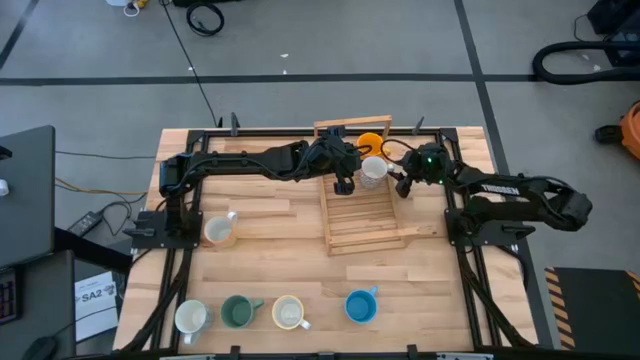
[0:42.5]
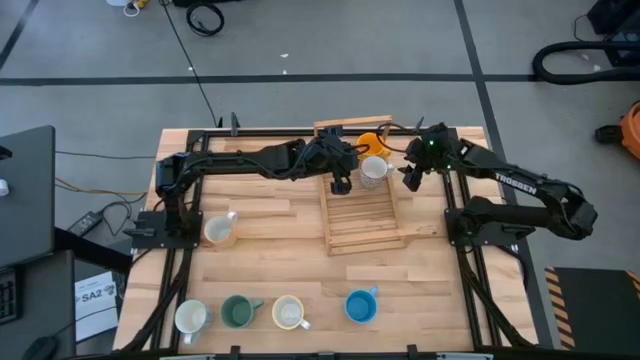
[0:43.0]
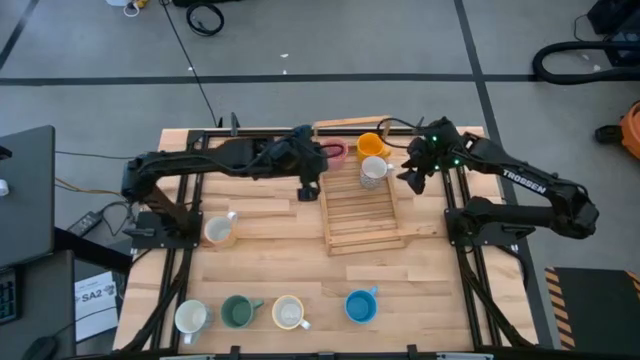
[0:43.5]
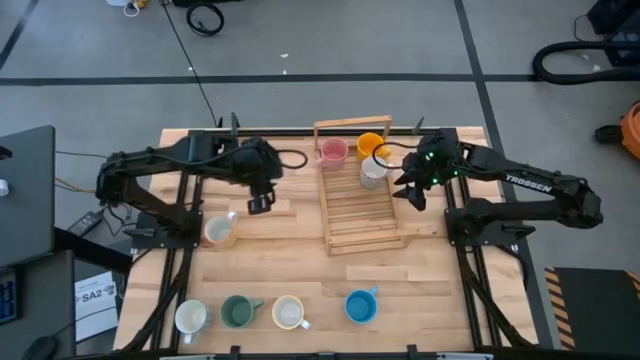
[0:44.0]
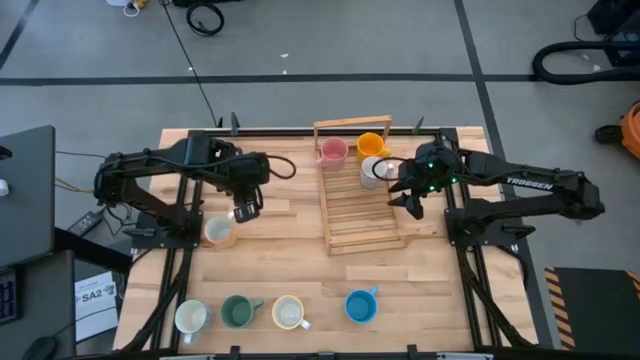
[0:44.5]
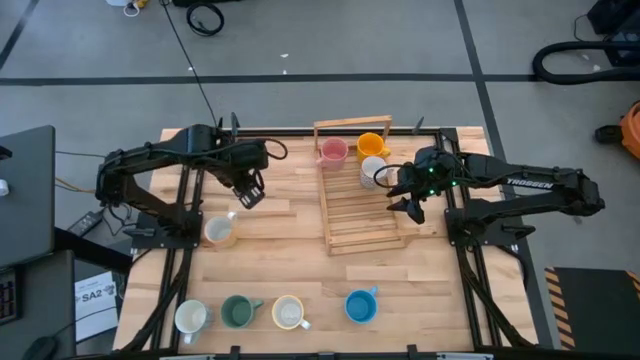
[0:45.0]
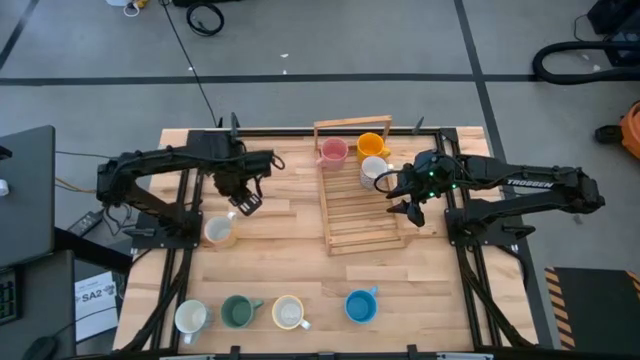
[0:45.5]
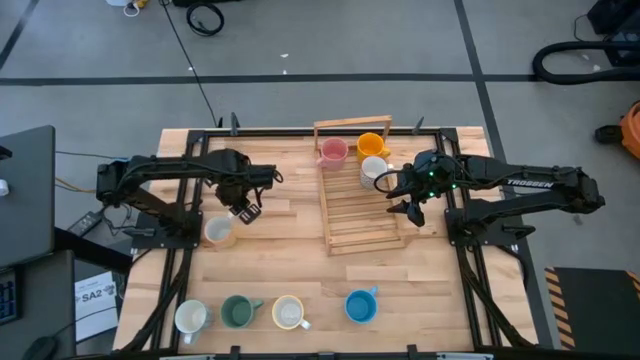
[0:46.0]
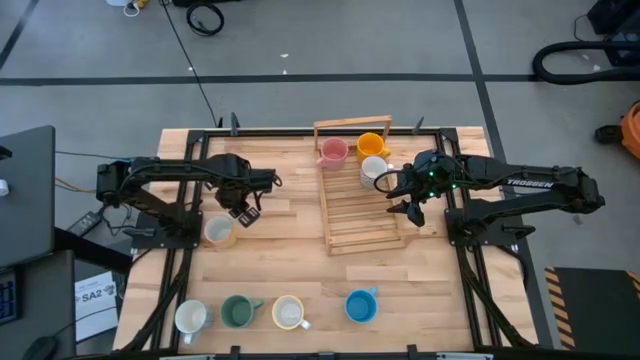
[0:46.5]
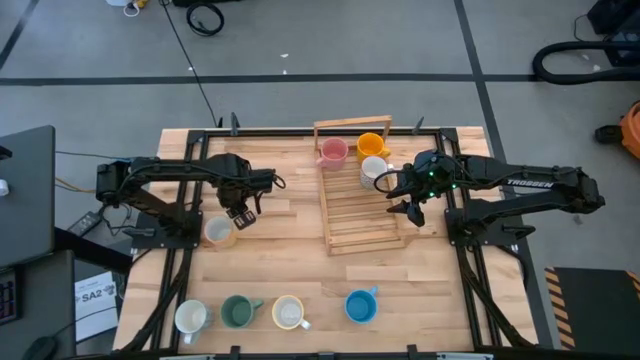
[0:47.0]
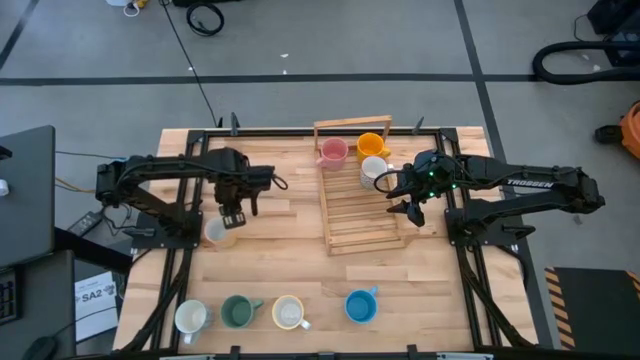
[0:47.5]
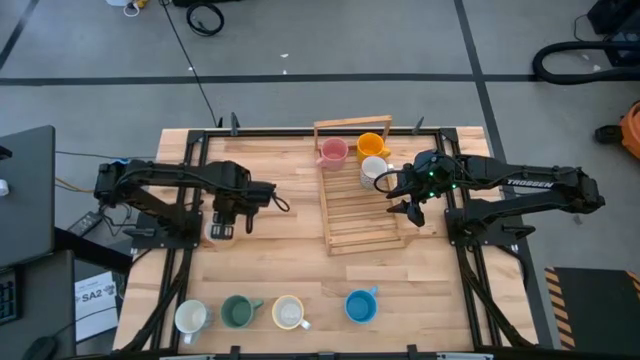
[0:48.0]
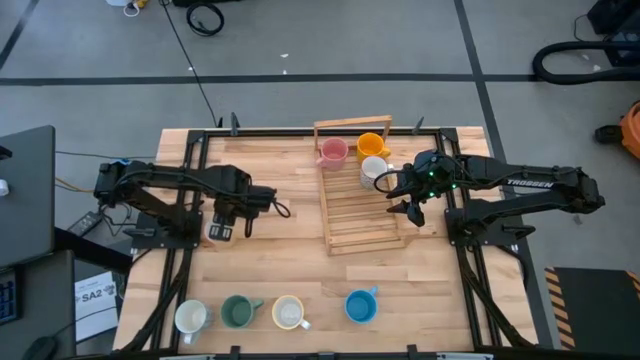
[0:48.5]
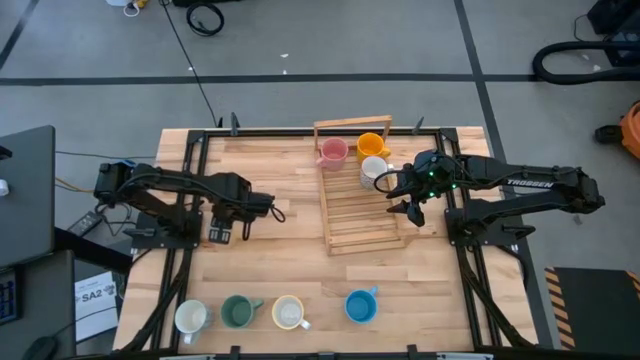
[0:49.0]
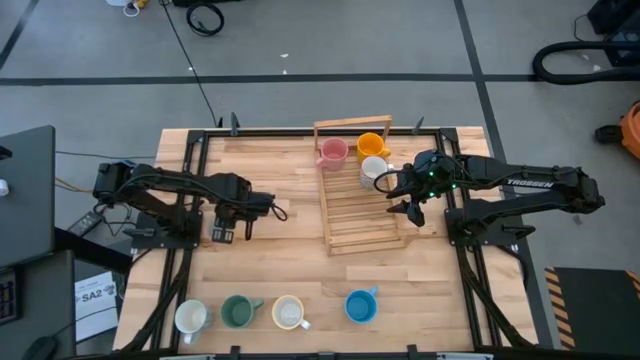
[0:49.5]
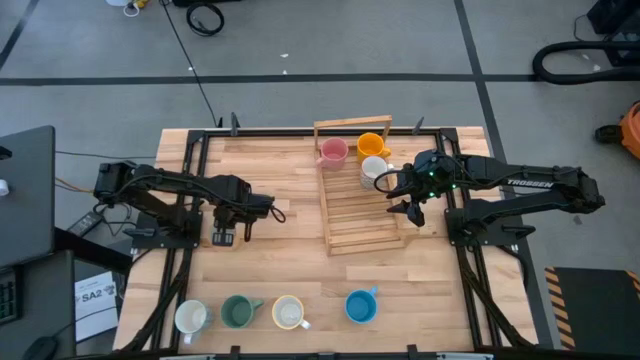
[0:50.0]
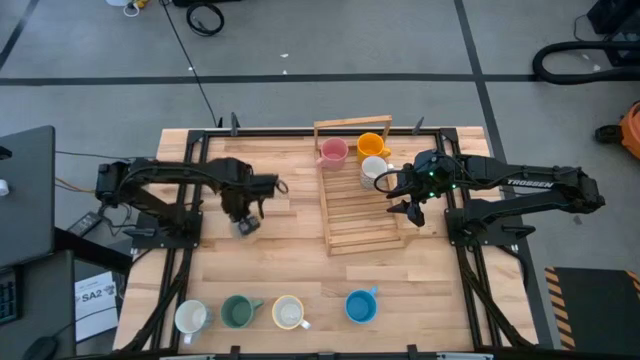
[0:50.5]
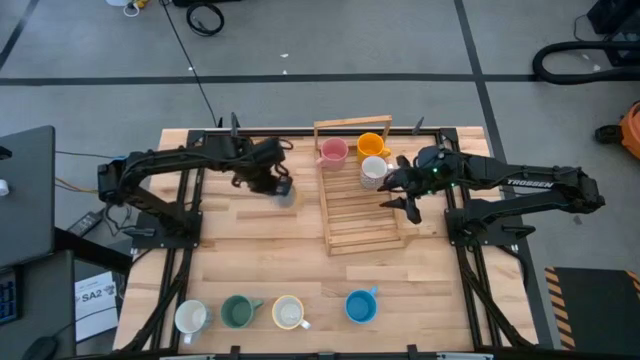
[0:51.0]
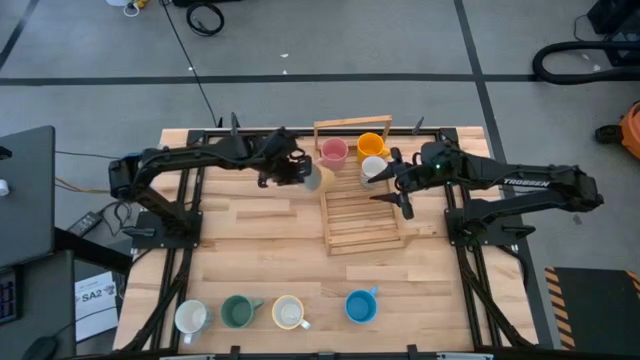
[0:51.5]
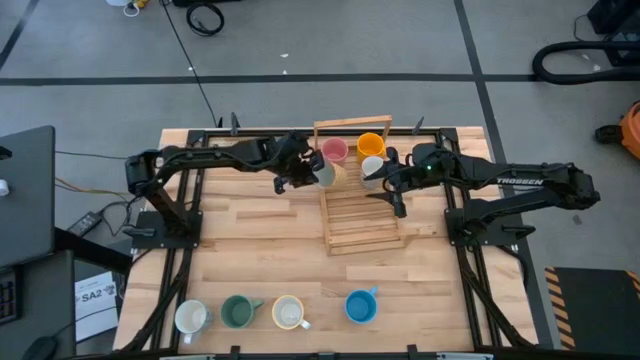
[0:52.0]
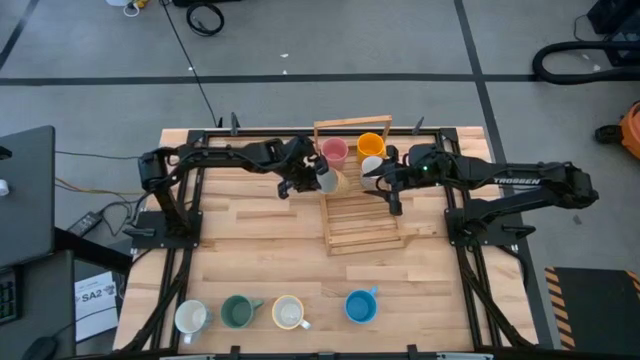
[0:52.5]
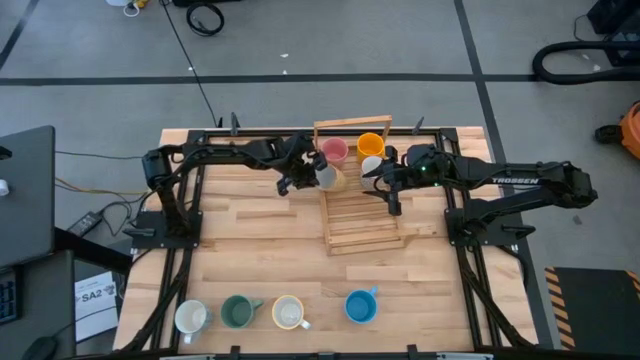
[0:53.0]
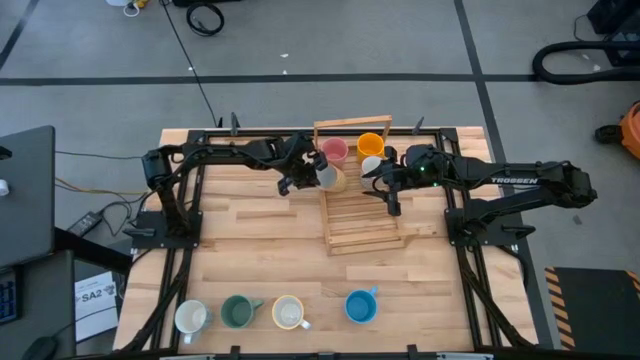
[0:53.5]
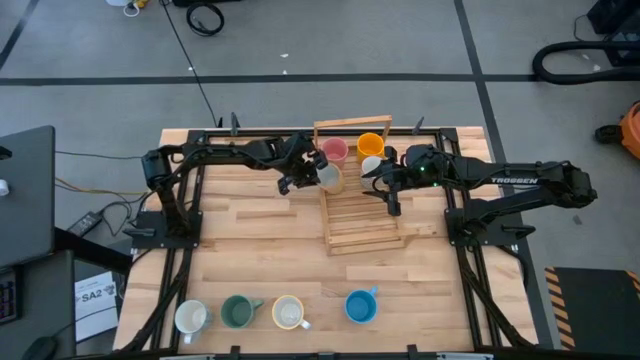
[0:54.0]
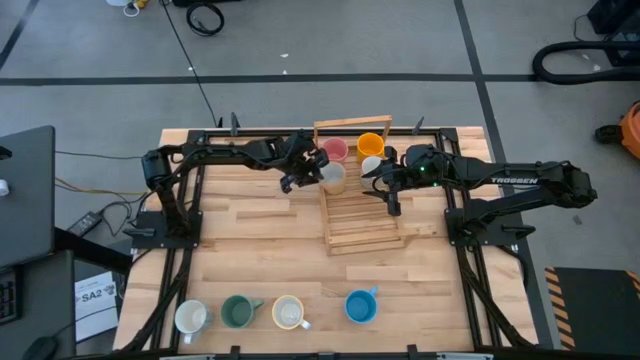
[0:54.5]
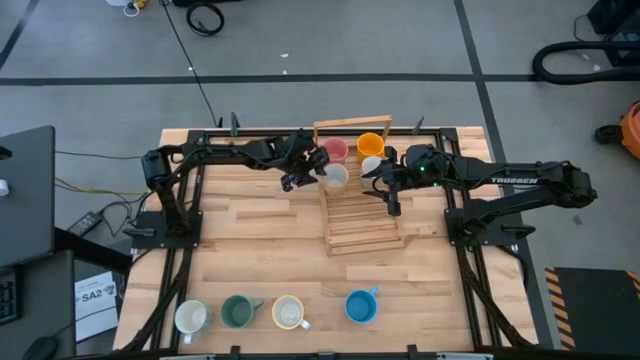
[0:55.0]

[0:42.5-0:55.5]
Task: Place coffee mugs
Put the yellow patterned mug on the shelf

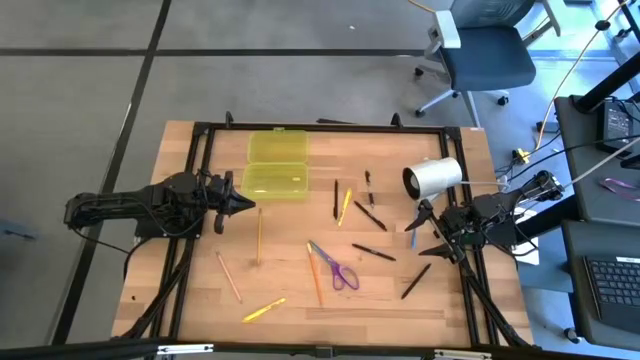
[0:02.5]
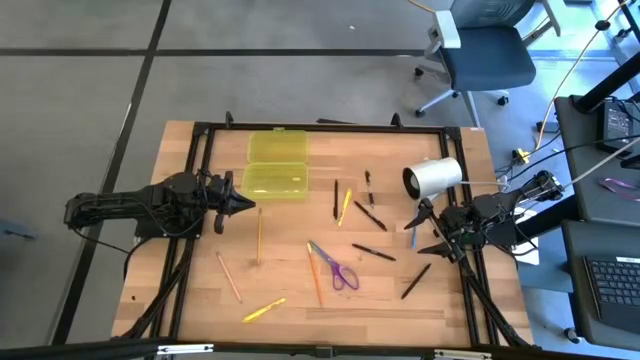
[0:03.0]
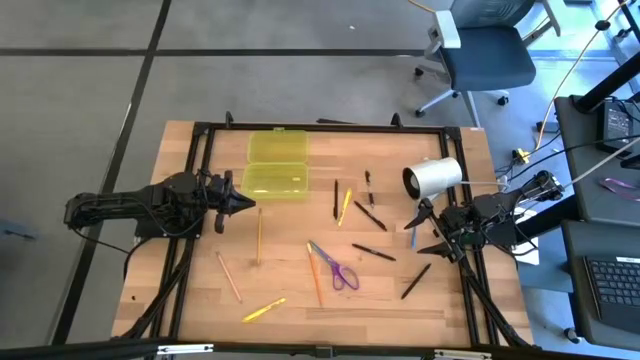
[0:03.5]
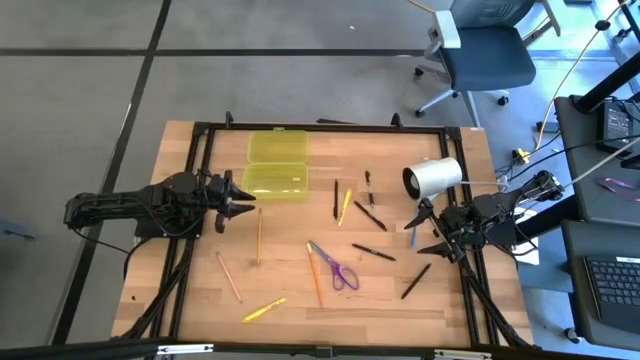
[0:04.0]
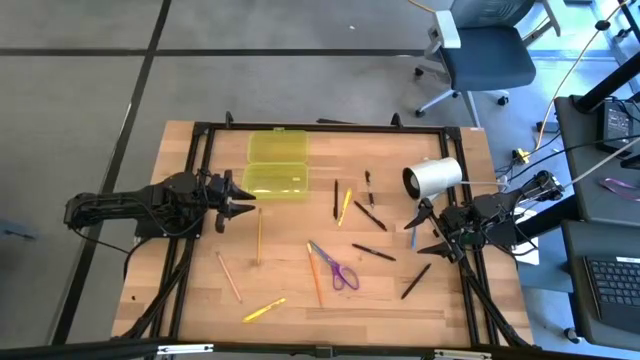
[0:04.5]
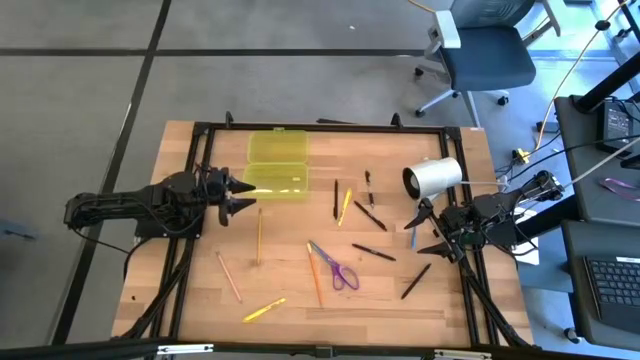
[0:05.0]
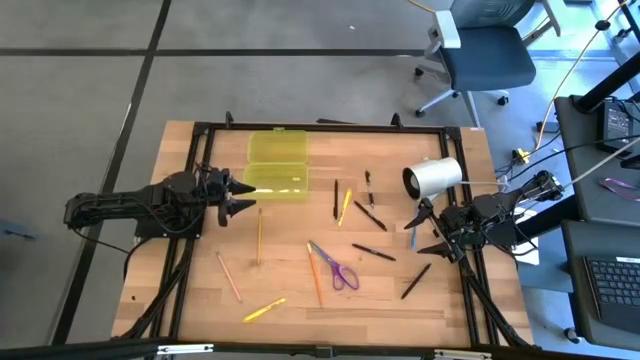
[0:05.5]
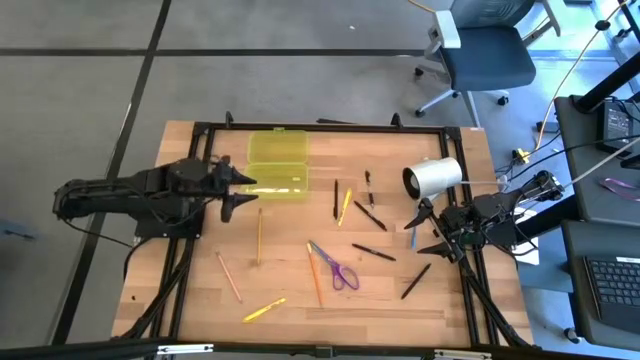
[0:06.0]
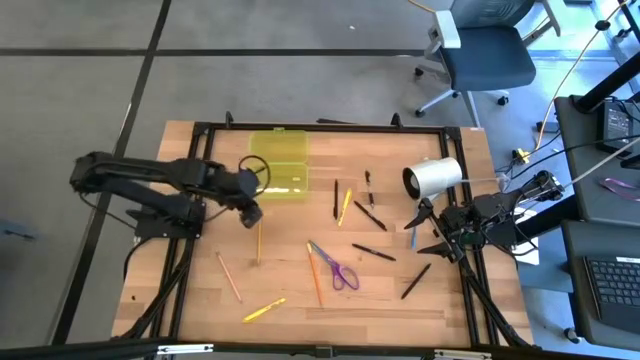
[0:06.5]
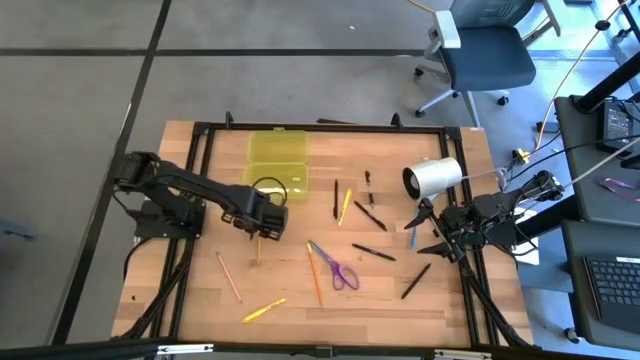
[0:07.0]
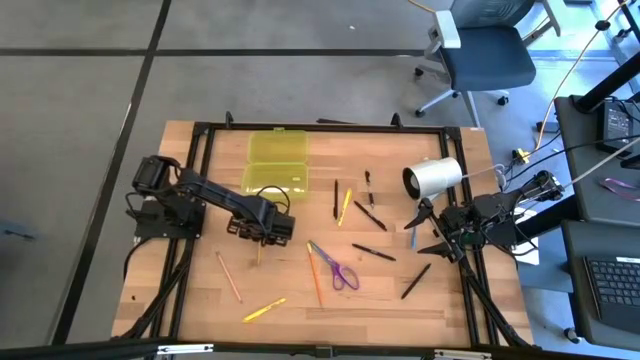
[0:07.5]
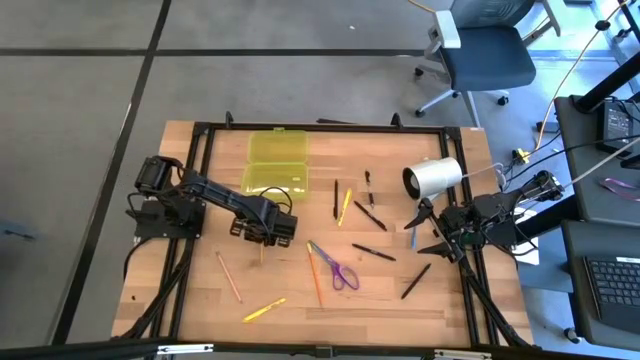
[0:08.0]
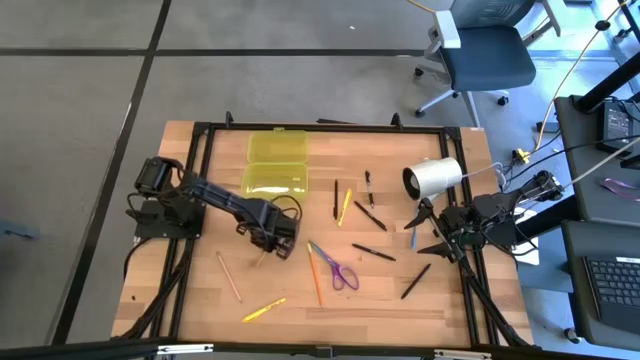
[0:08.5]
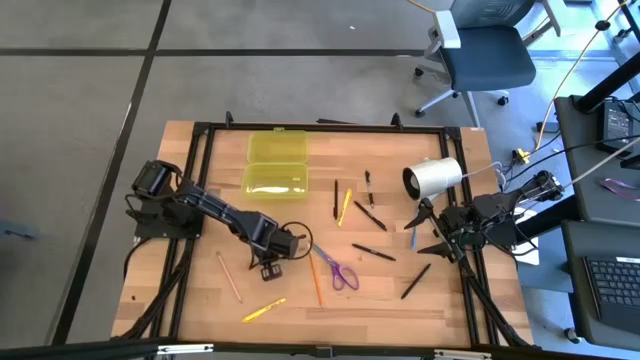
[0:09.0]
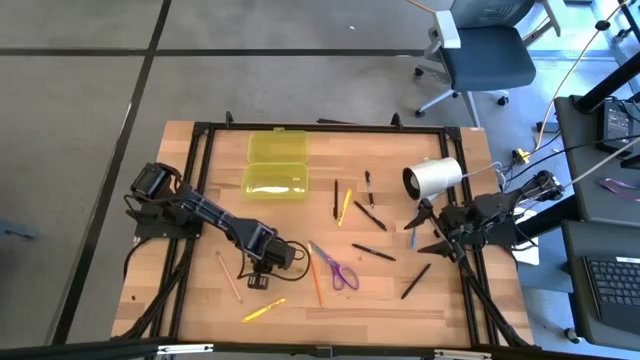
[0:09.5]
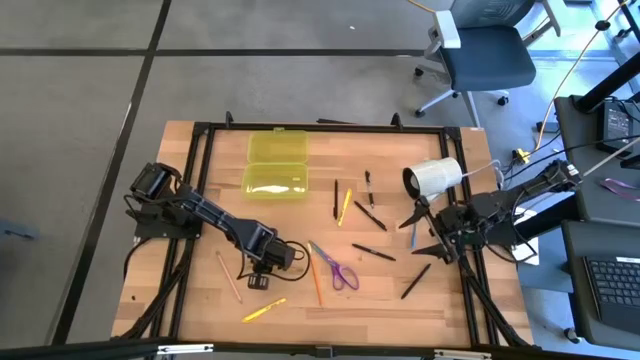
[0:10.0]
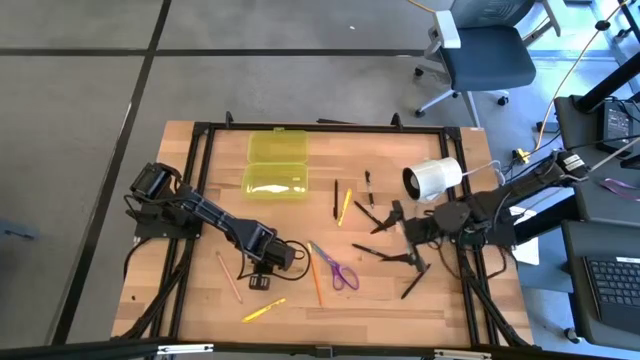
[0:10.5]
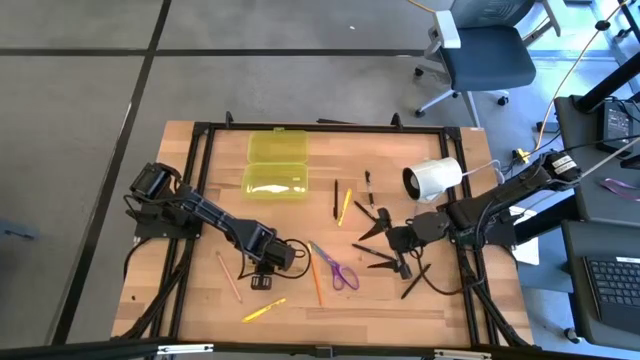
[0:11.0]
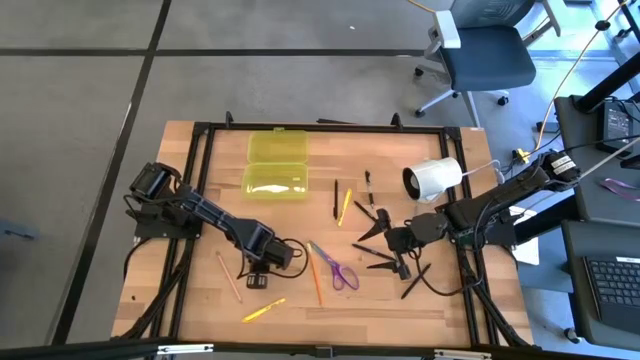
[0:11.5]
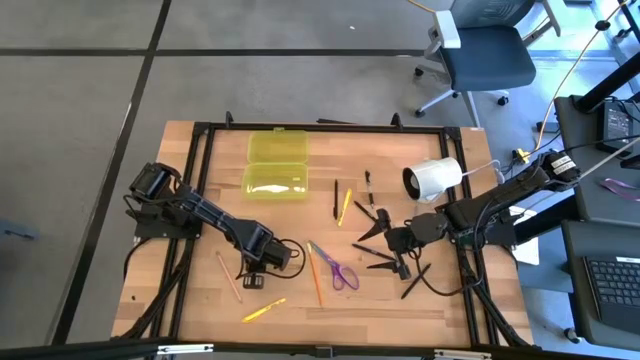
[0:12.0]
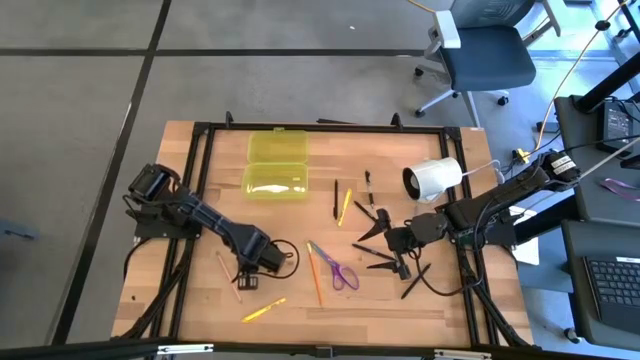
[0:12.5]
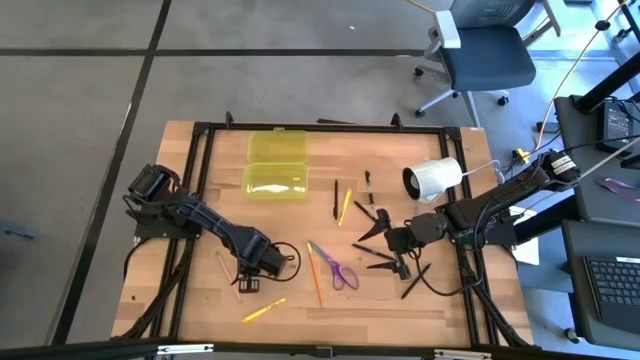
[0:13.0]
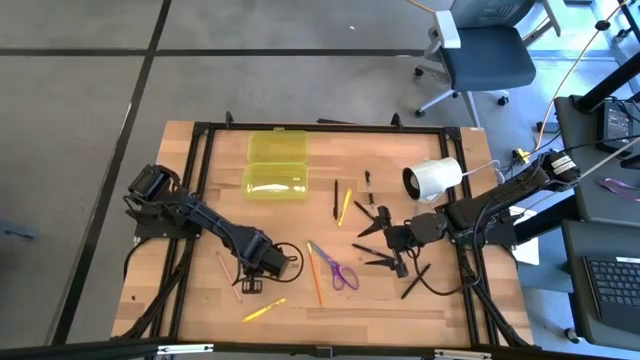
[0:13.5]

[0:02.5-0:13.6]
Task: Pick & place school supplies into a supply box
Put the yellow pencil into the yellow supply box
